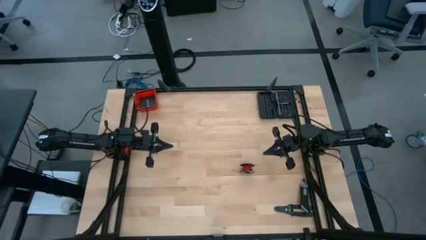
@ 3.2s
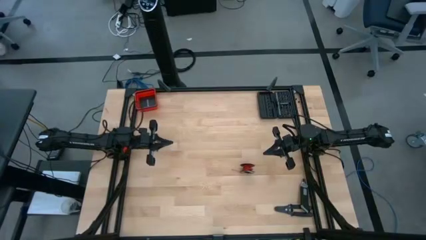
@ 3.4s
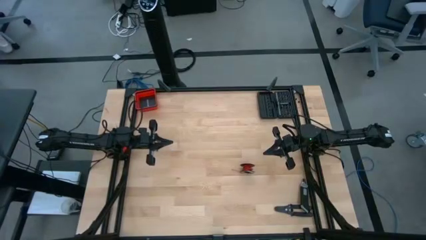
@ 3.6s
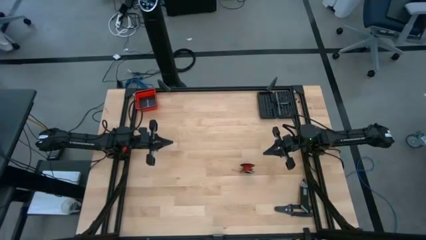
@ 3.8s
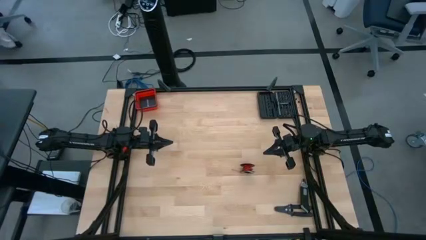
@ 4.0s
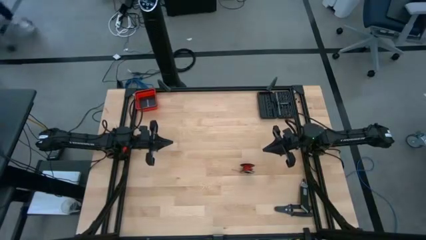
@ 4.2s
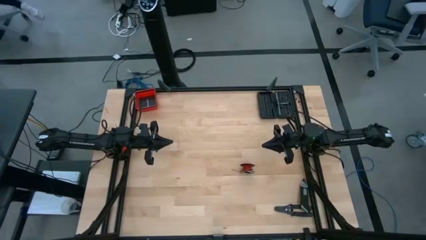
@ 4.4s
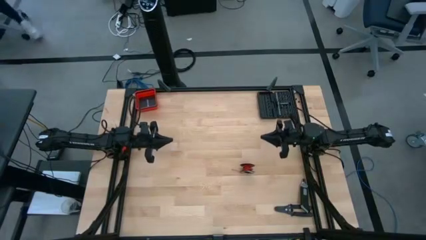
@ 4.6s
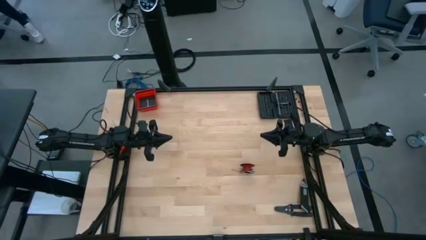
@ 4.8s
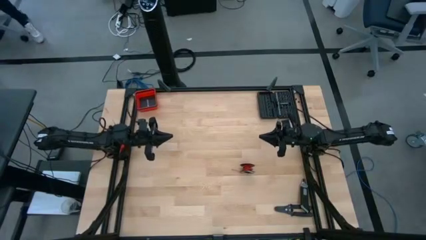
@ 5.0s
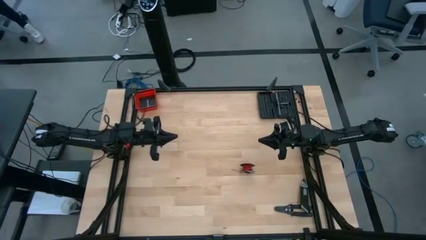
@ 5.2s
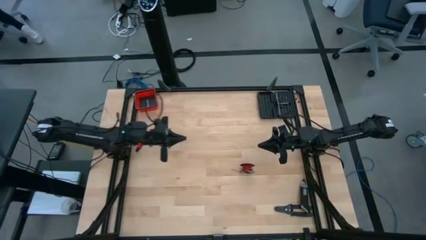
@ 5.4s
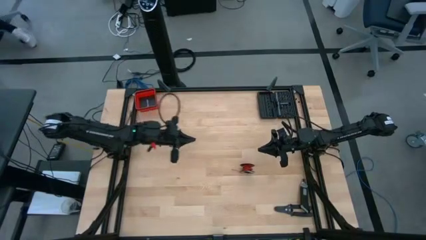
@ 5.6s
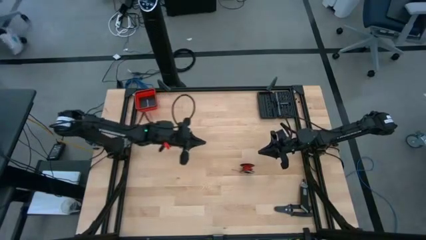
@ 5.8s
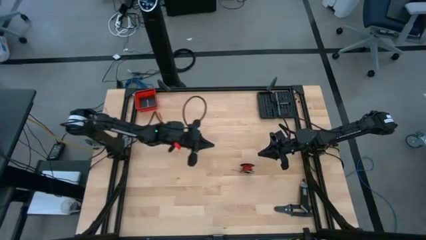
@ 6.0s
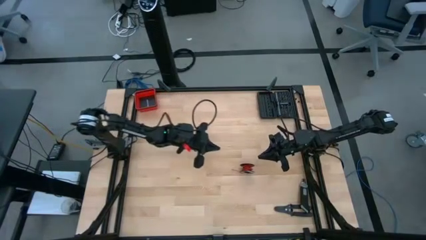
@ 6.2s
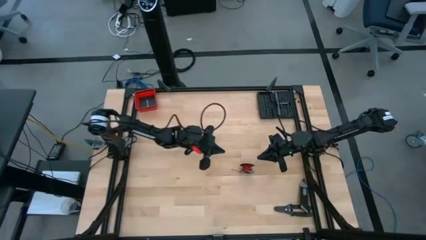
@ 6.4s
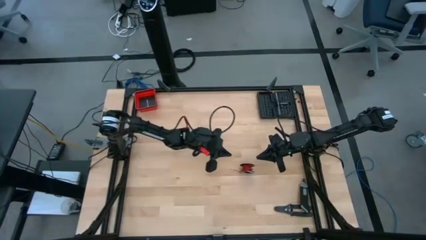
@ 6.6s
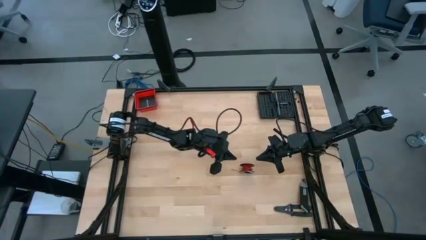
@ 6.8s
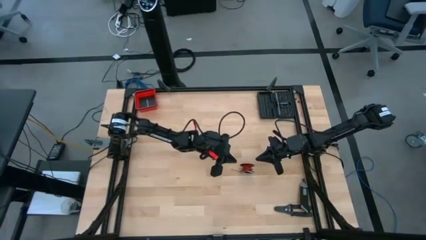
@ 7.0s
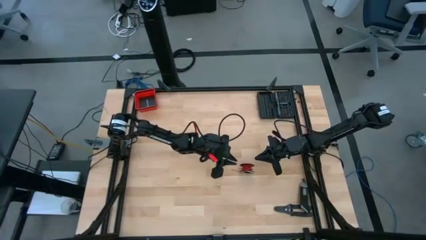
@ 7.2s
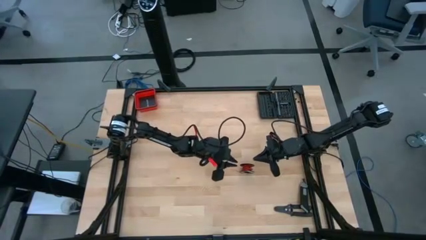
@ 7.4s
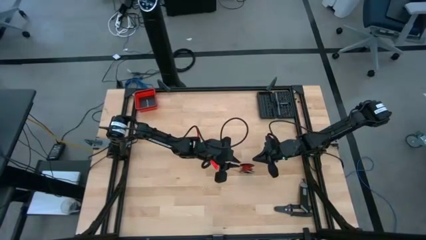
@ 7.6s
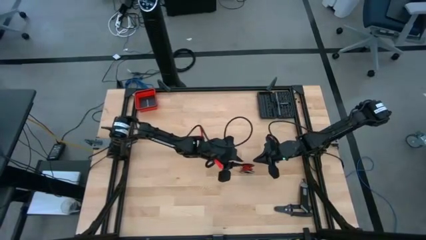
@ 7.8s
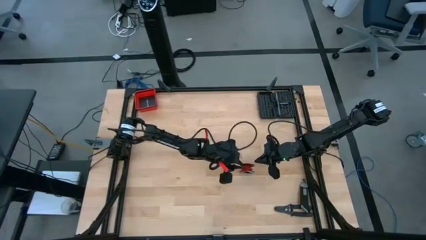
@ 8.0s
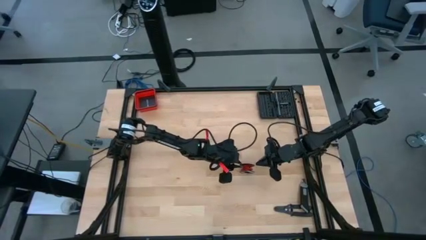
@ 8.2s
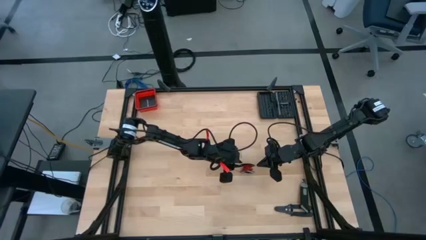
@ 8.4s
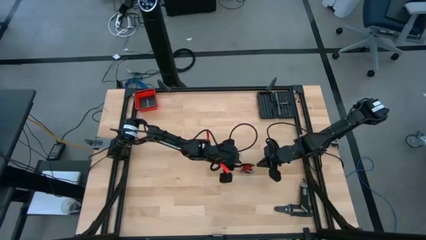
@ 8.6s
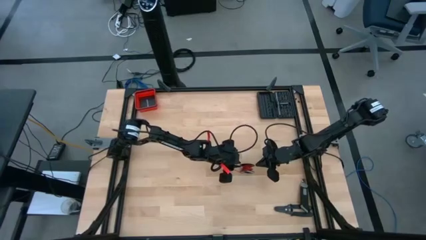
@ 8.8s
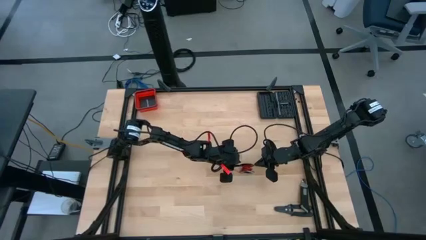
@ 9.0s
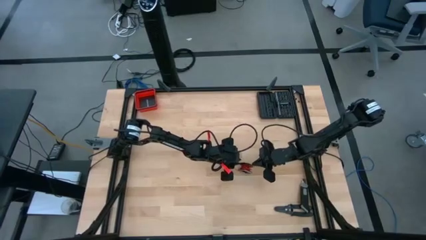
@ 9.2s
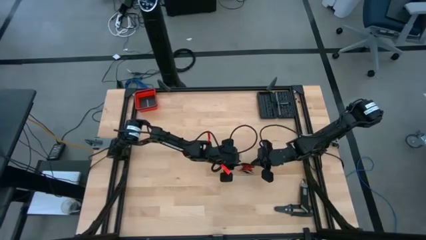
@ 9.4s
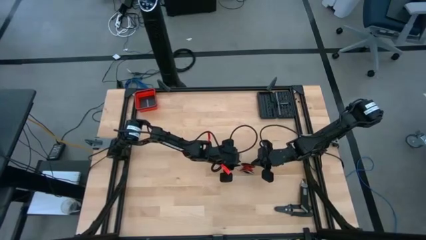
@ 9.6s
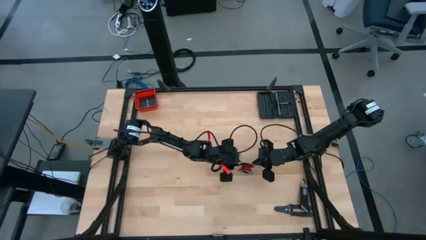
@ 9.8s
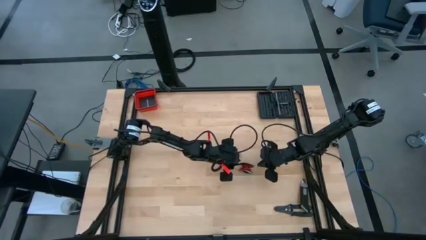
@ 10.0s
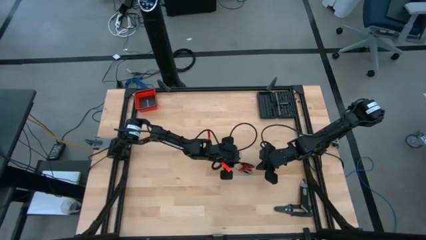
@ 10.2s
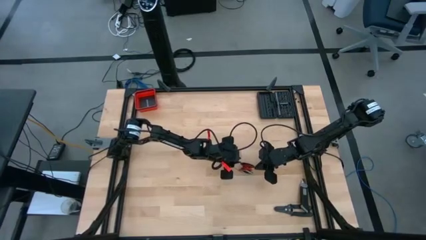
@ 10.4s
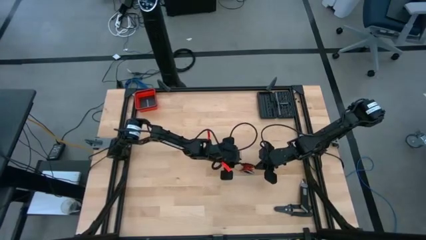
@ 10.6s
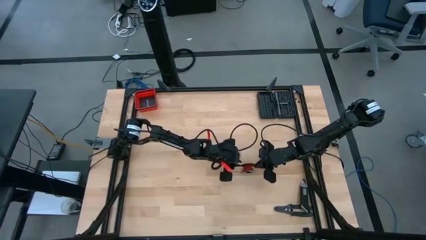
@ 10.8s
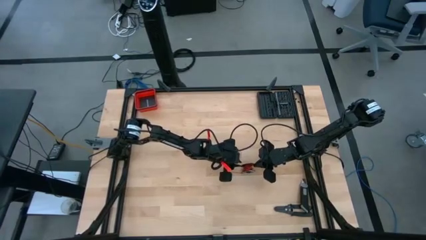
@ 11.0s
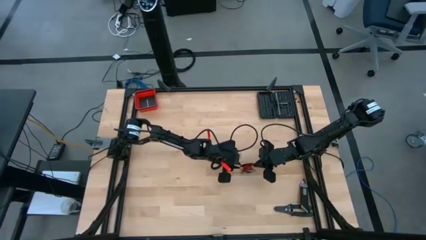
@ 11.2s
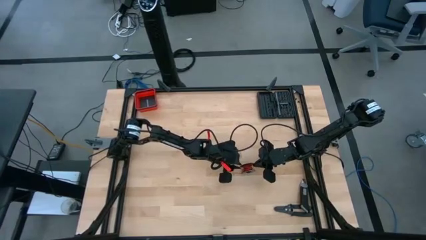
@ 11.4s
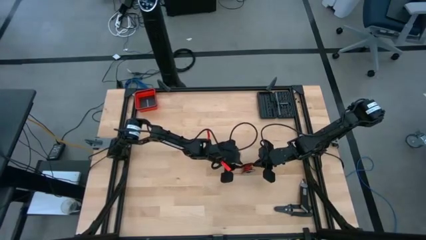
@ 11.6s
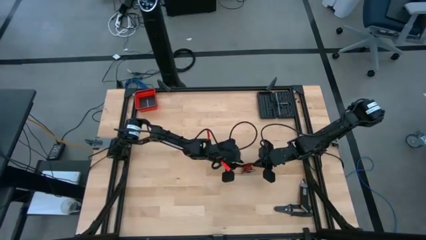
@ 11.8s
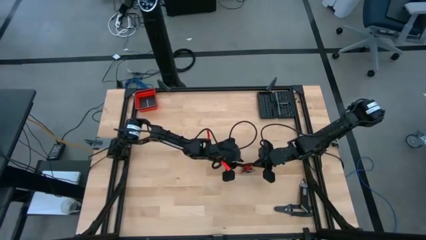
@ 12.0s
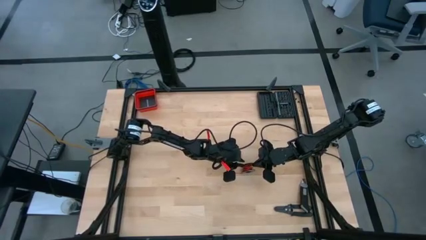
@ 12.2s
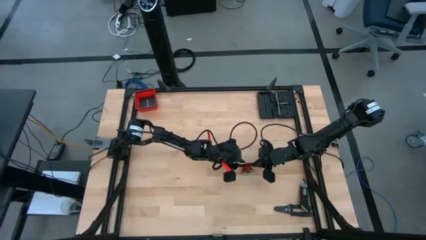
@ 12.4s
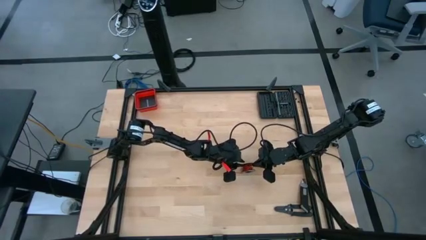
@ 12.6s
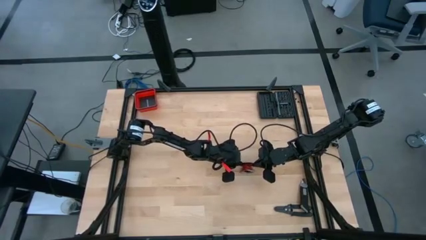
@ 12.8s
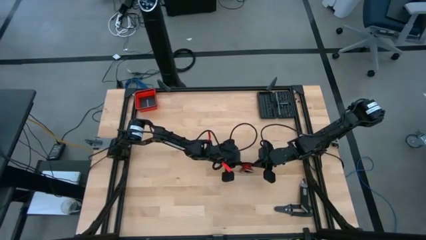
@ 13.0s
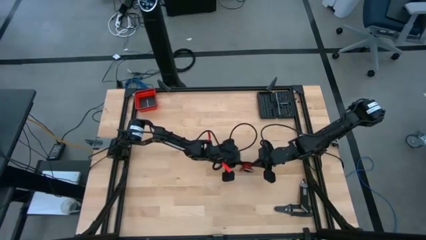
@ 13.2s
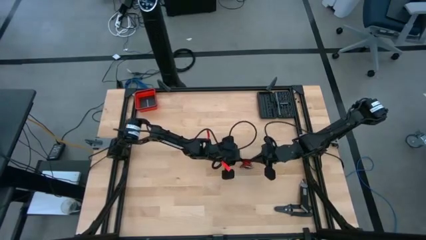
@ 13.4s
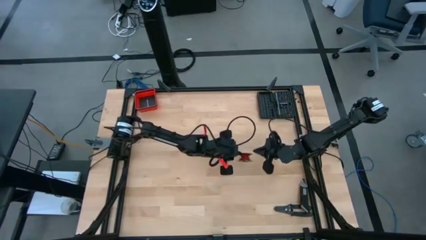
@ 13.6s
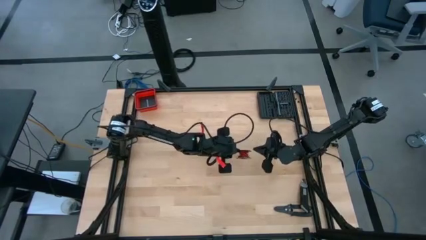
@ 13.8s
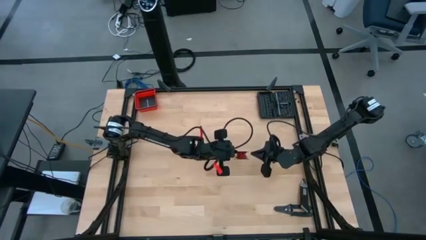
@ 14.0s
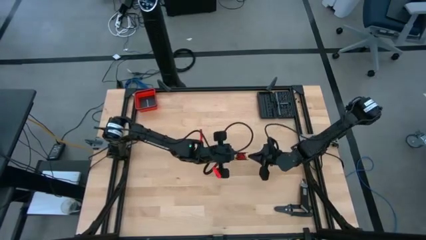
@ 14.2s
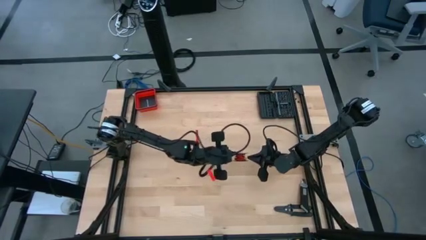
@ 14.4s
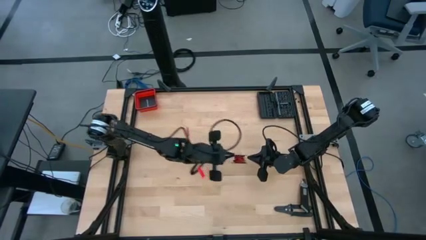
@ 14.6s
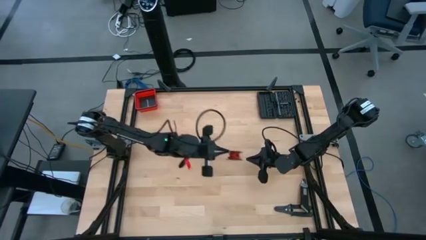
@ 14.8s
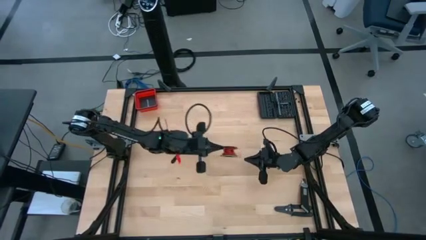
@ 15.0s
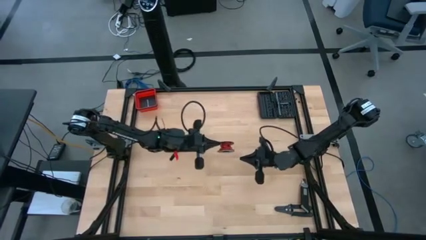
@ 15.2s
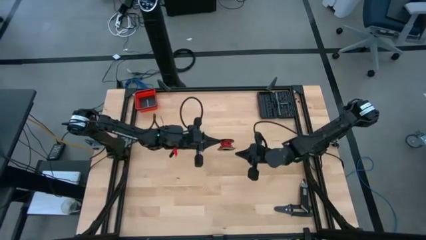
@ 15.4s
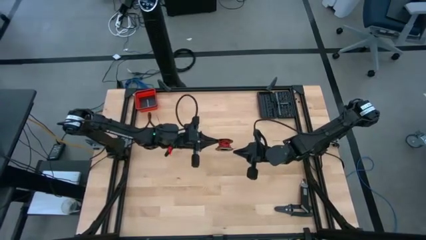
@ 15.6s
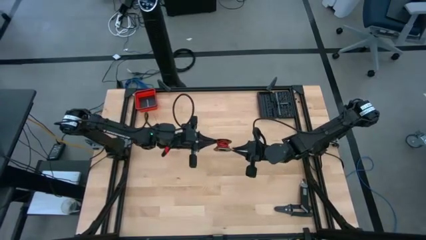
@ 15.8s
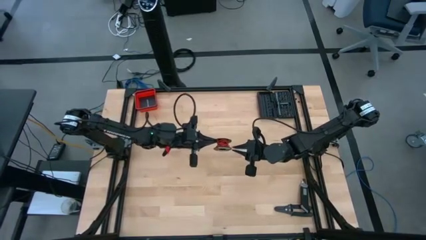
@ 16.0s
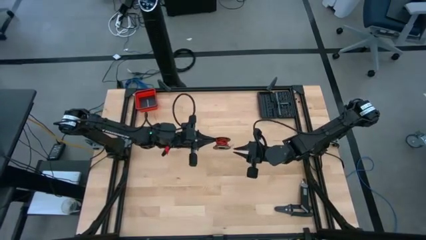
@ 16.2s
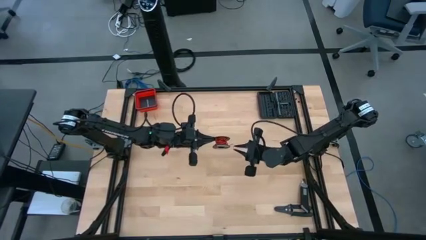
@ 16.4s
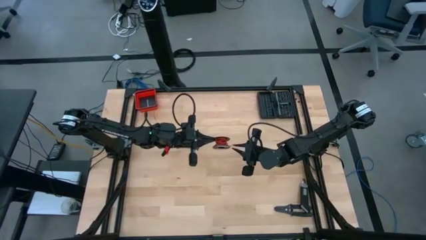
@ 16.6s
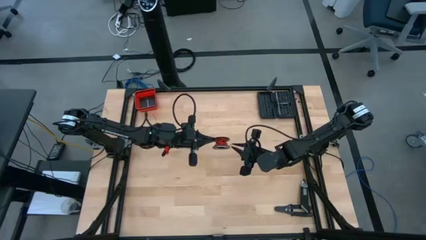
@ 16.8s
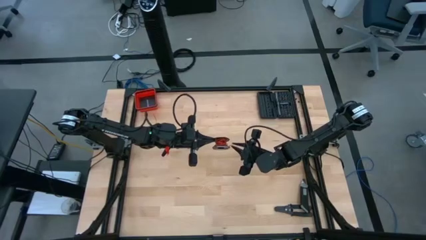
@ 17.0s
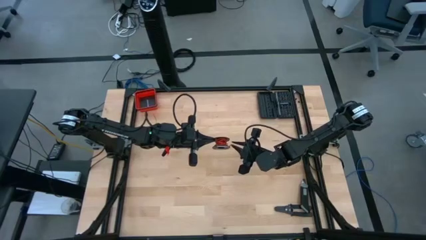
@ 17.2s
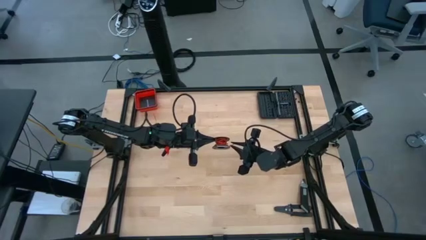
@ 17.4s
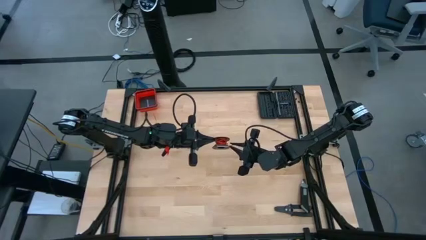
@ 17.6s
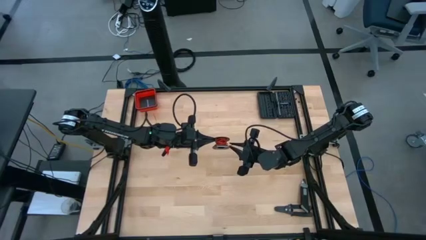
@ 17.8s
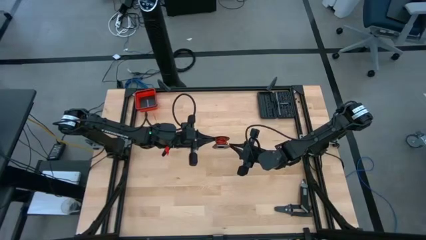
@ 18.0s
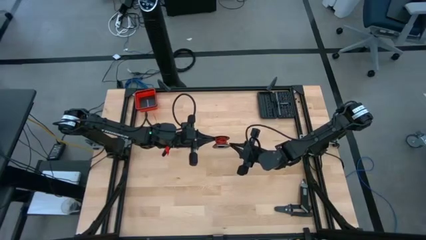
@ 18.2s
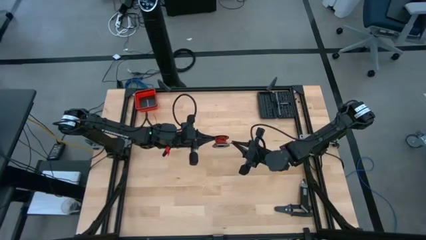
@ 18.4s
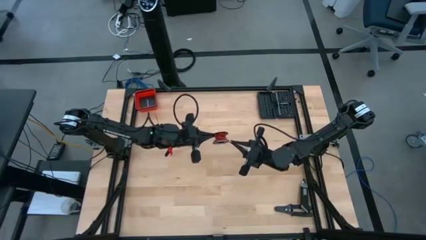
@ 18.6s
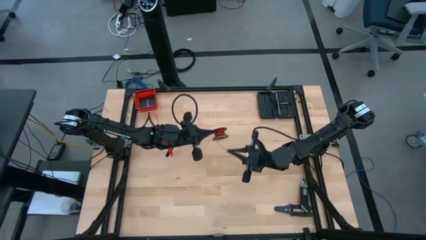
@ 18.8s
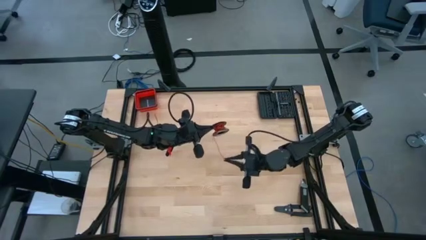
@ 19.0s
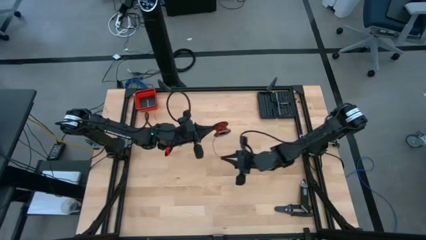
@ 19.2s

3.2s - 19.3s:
Task: Coil cords
Uncoil the red wire from the spool
